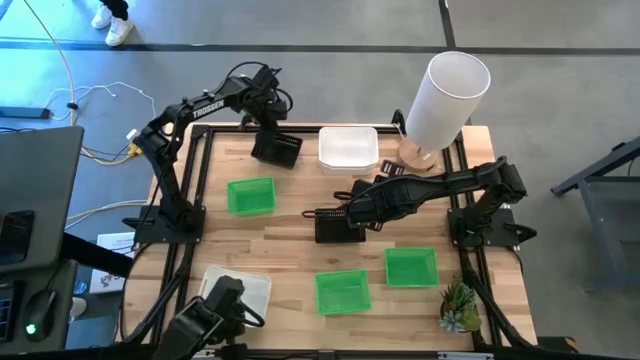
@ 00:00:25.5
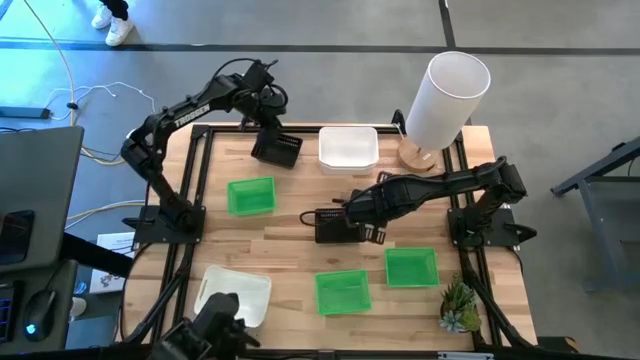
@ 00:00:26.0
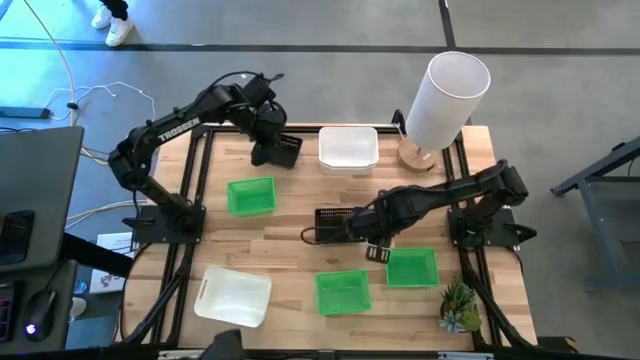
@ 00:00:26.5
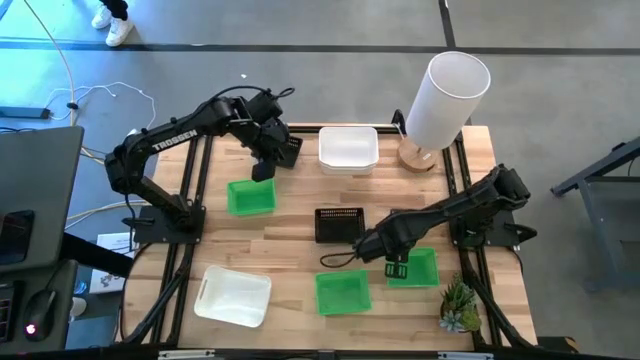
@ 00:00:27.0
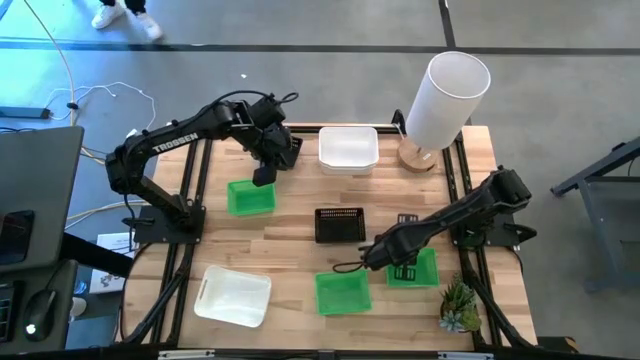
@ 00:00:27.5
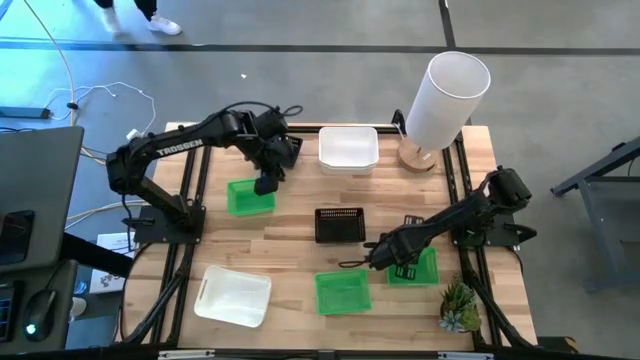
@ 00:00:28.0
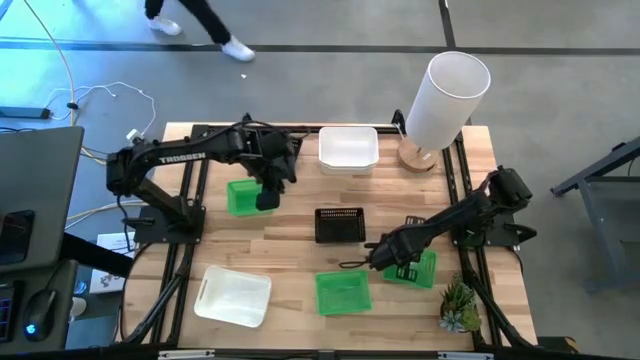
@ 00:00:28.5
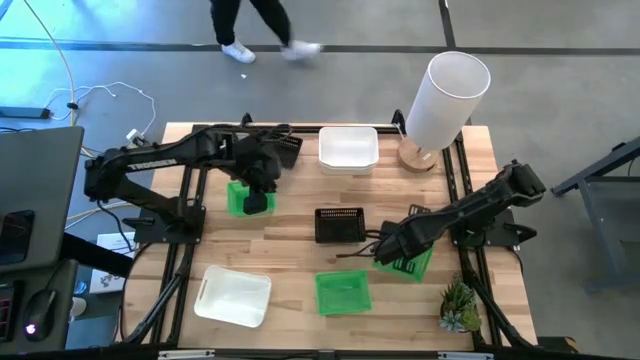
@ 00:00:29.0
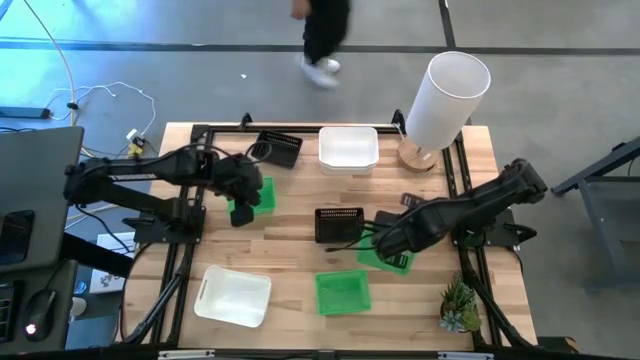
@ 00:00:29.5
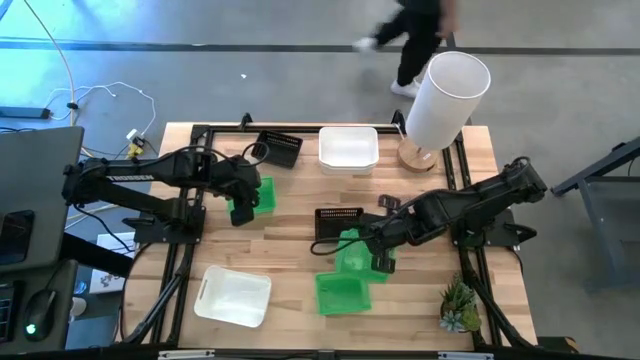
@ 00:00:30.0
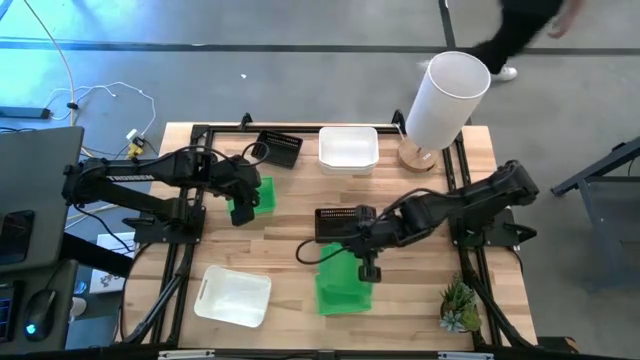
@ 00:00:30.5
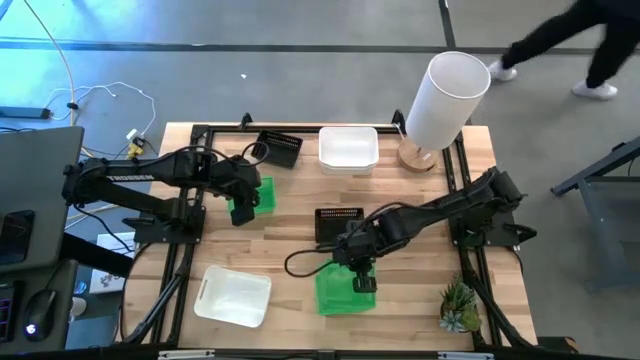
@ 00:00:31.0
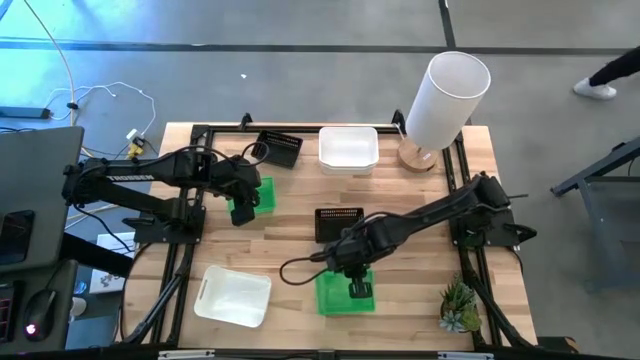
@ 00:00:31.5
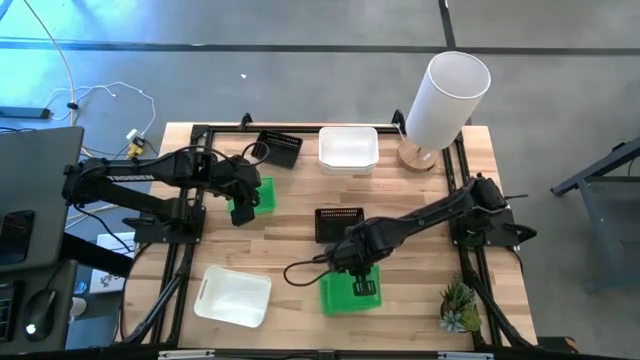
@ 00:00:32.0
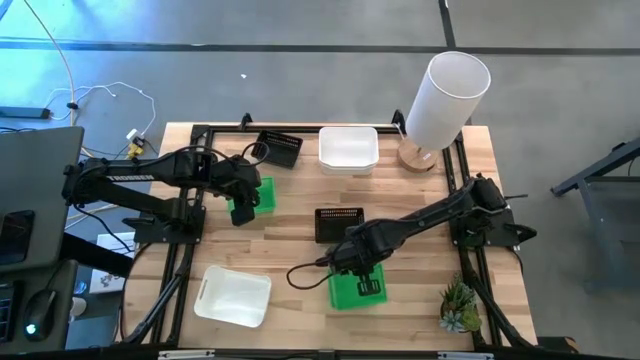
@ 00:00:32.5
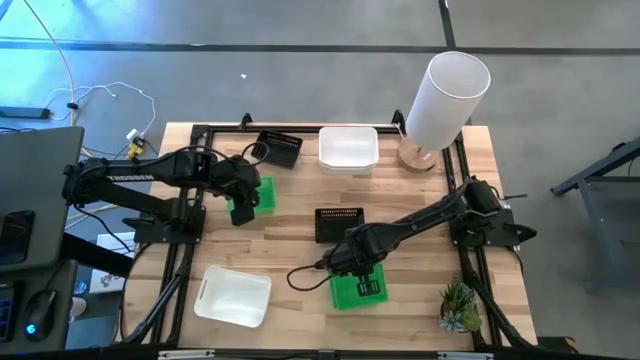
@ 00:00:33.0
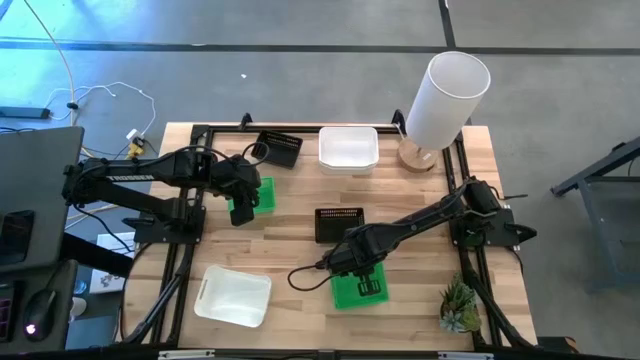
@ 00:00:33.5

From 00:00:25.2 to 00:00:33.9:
Task: Stack baskets on shelf by color
Stack the bottom right green bin on the bottom left green bin

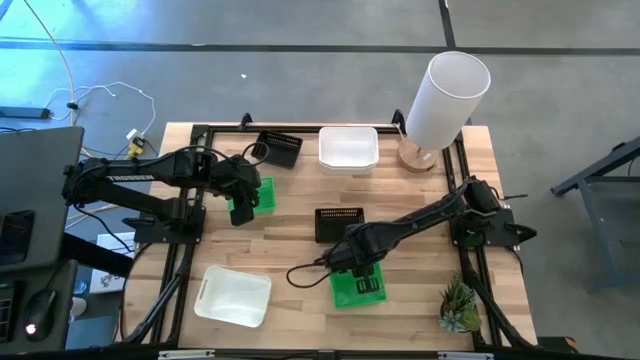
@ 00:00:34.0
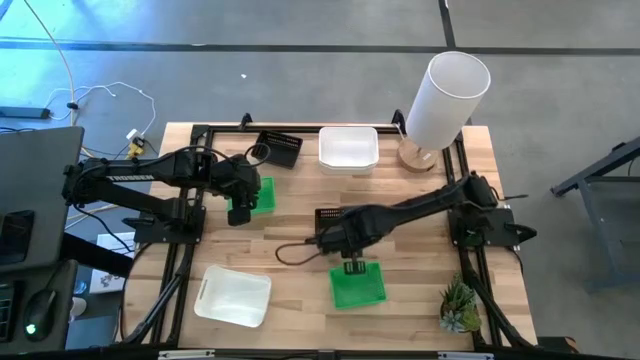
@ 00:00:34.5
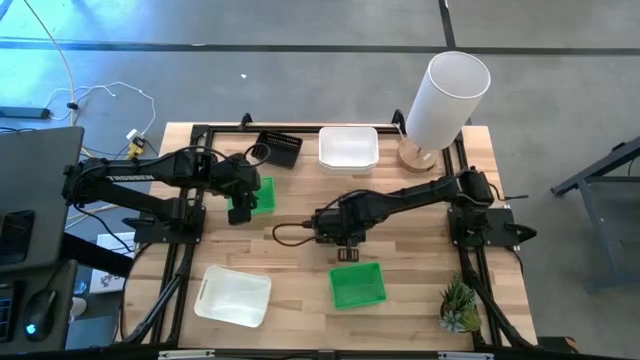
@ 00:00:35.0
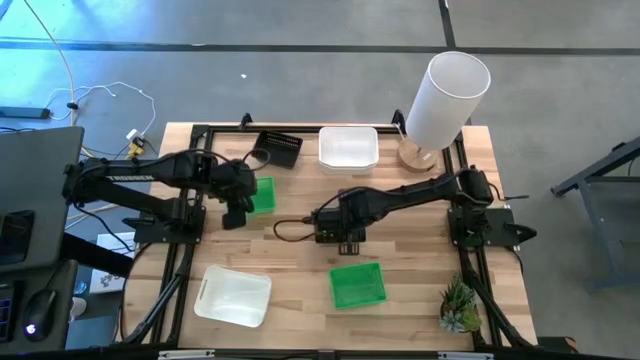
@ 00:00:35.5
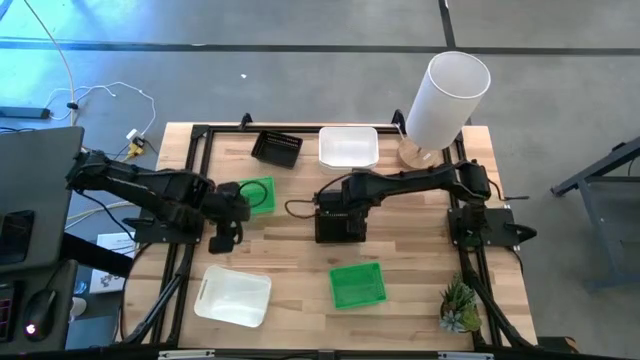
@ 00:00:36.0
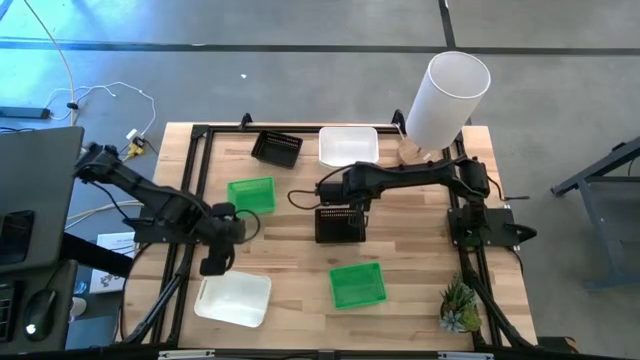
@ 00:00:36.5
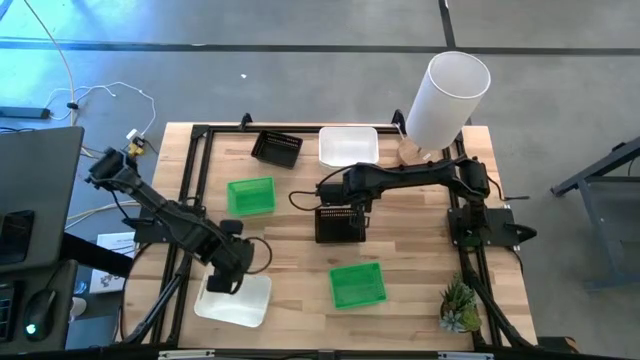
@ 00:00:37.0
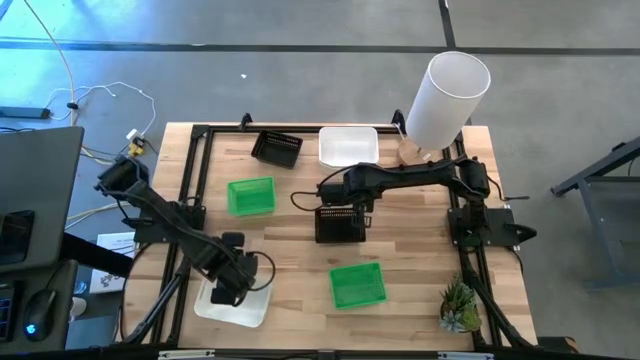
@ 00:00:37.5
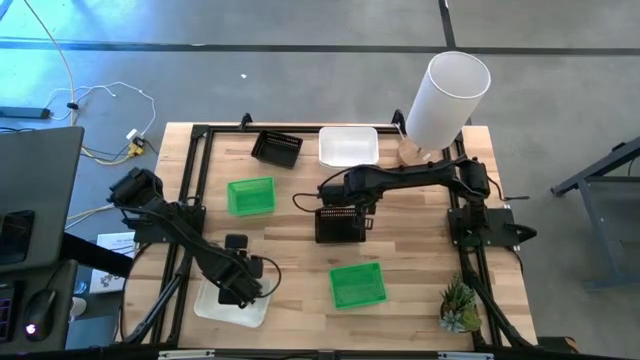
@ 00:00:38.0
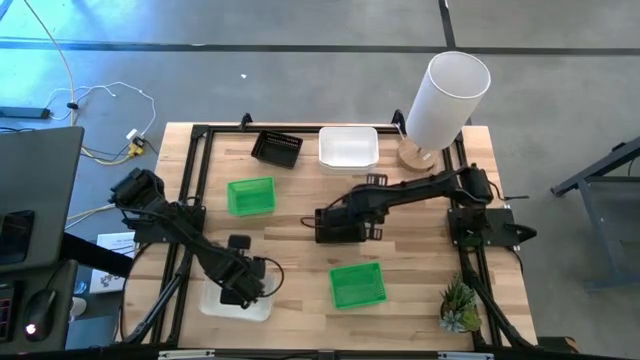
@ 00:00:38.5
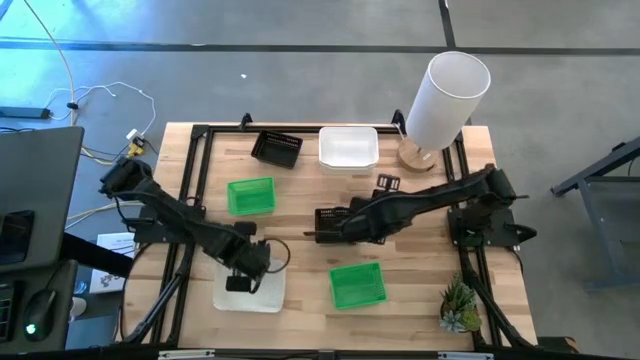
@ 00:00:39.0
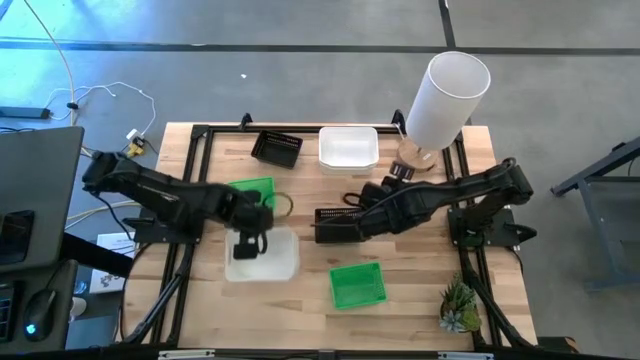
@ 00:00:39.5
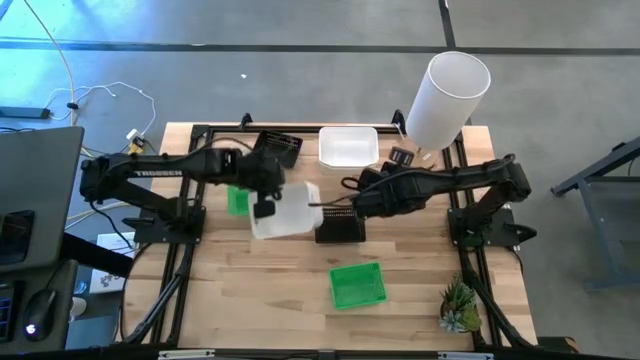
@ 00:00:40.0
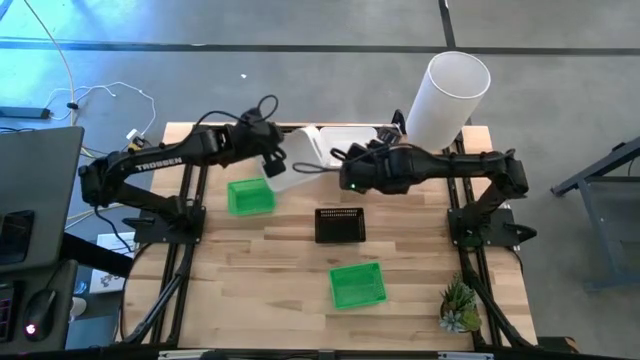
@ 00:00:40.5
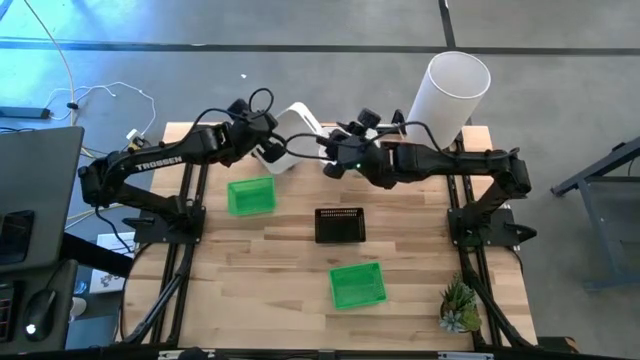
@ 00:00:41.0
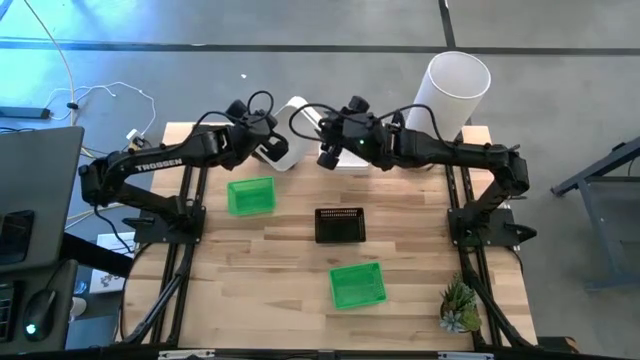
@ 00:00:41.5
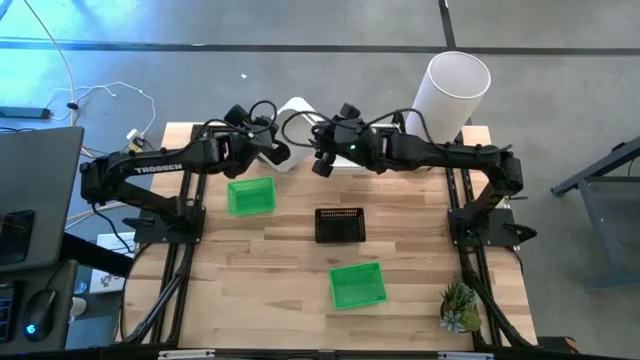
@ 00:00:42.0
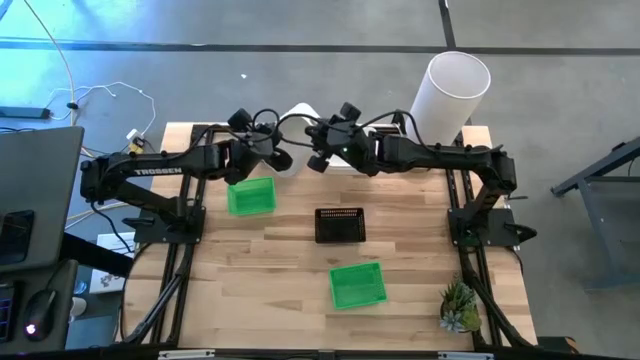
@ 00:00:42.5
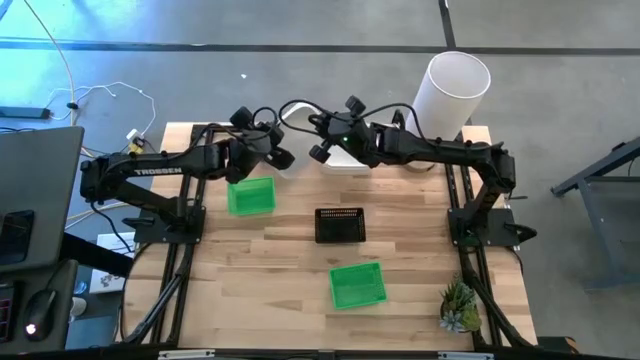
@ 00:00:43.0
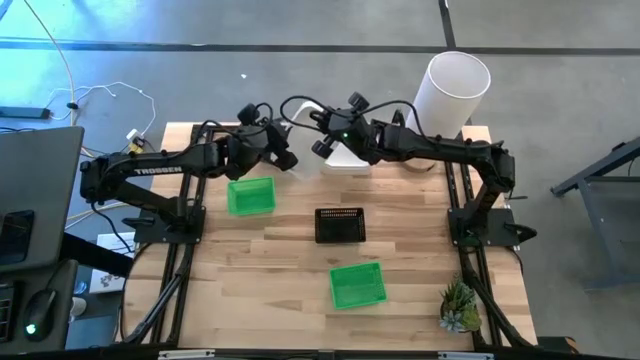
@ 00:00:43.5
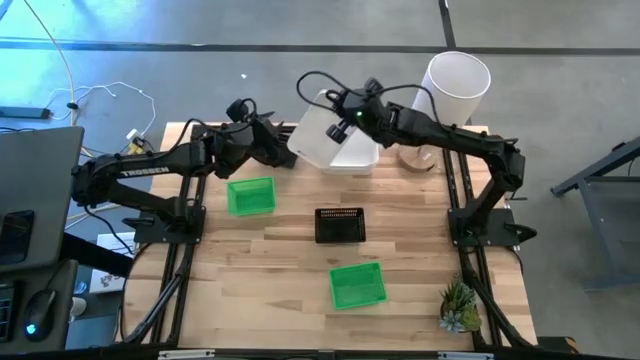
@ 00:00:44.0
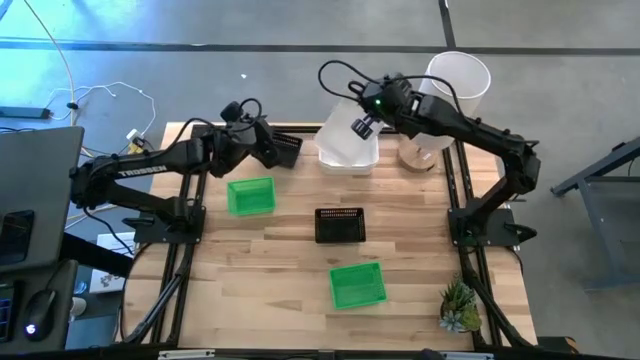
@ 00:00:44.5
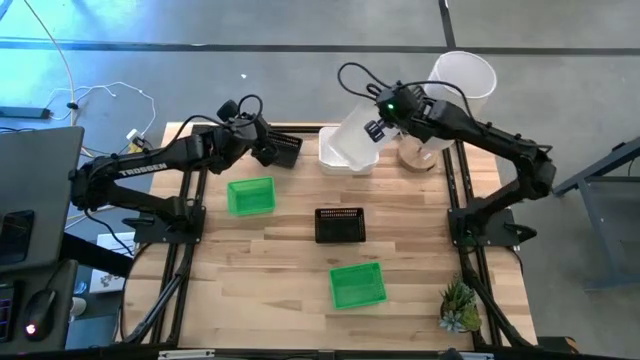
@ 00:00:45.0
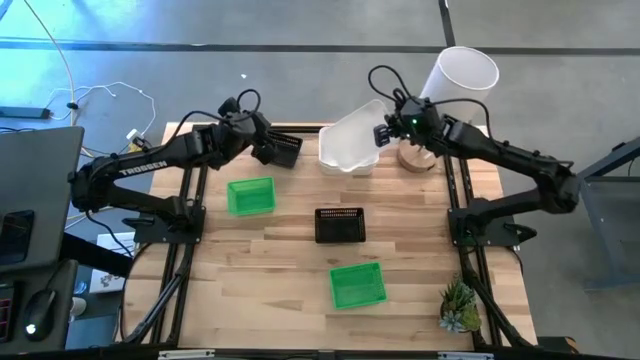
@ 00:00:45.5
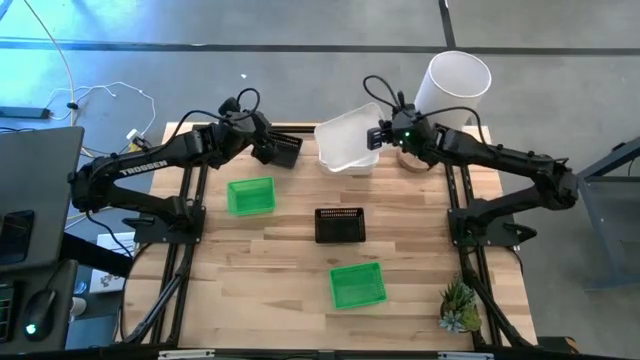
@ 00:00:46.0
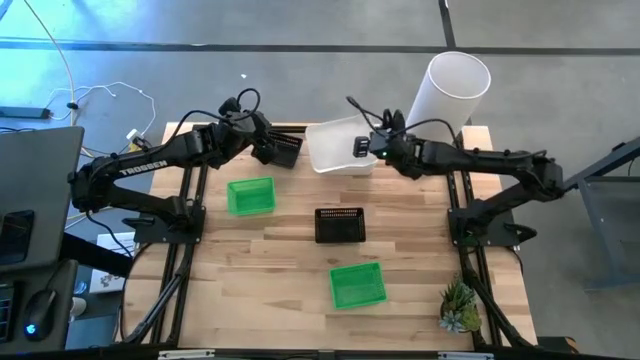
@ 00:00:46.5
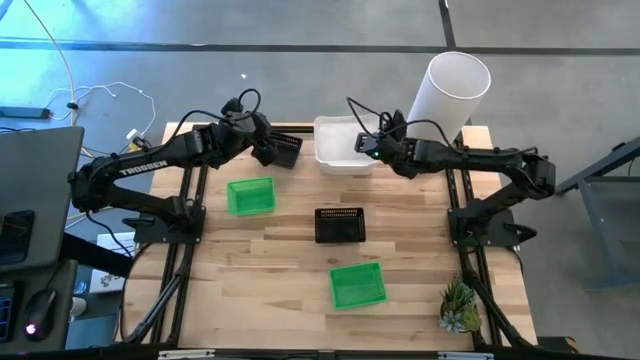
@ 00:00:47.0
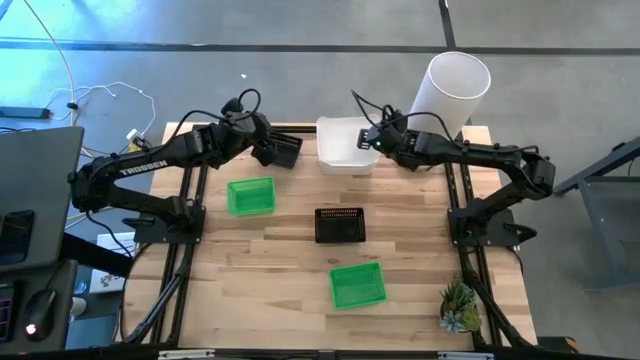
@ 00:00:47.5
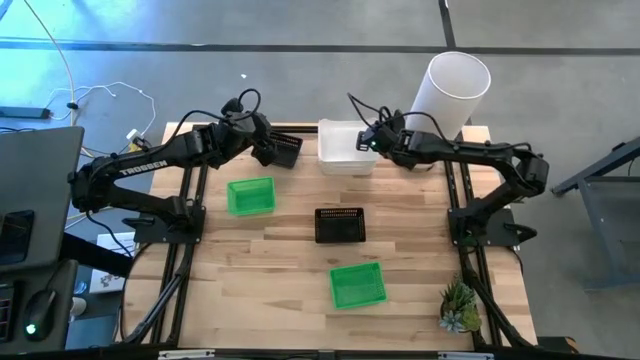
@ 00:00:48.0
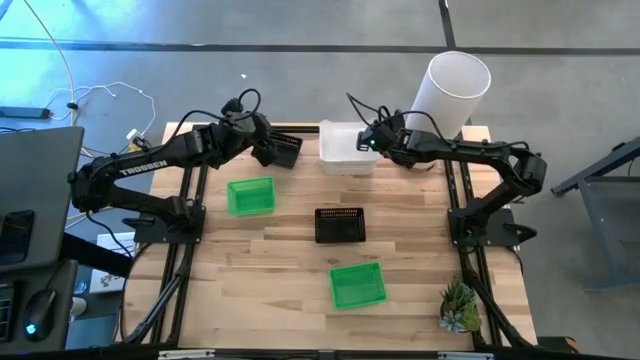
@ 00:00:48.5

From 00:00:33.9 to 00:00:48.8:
Stack the bottom white bin on the stacked white bins
